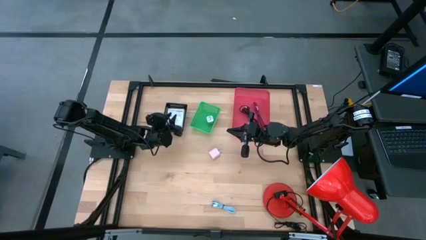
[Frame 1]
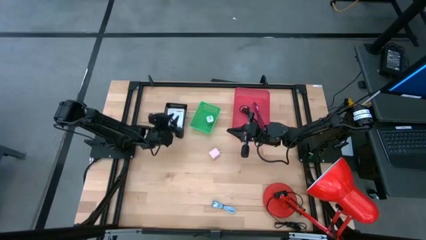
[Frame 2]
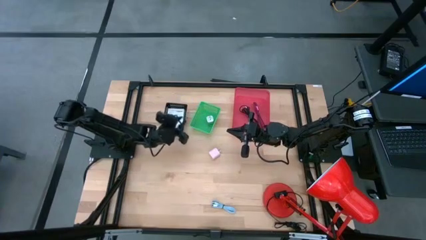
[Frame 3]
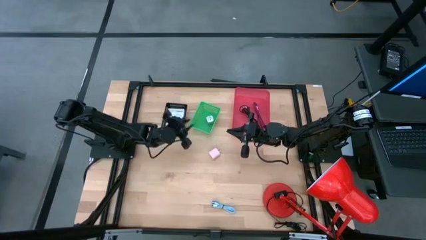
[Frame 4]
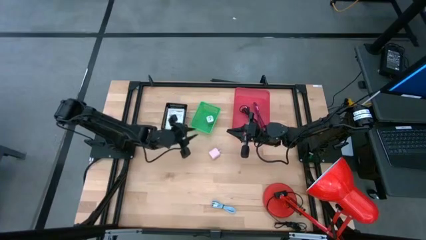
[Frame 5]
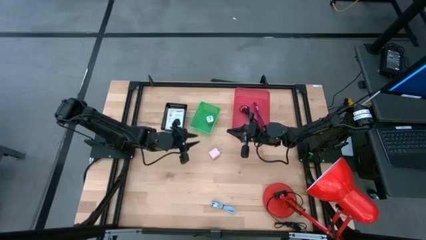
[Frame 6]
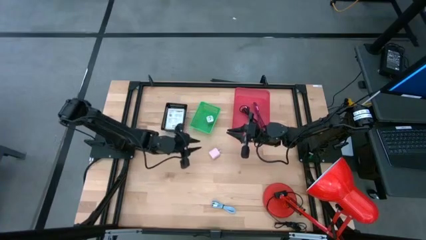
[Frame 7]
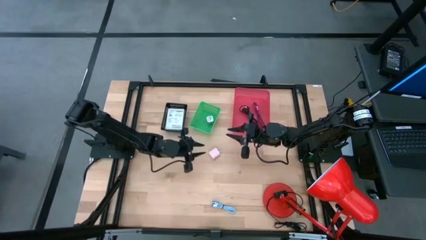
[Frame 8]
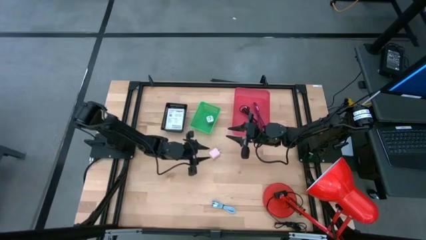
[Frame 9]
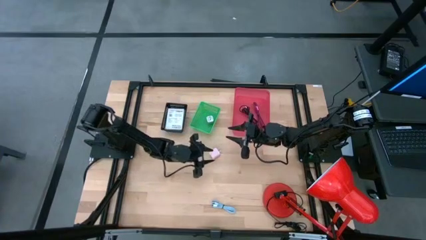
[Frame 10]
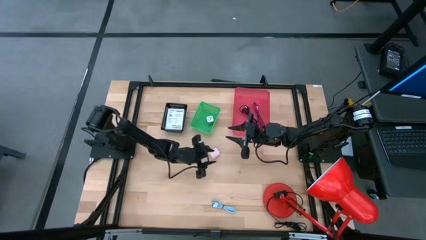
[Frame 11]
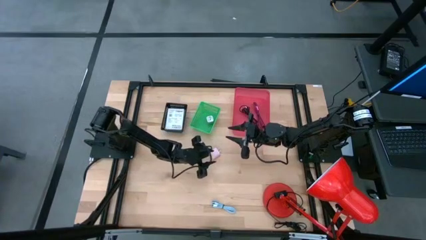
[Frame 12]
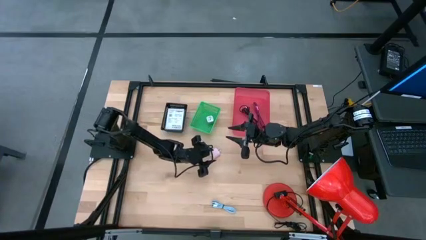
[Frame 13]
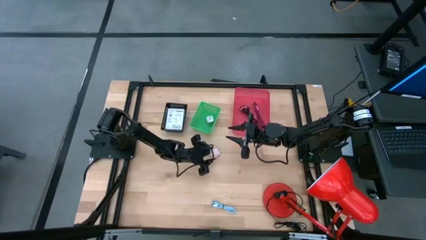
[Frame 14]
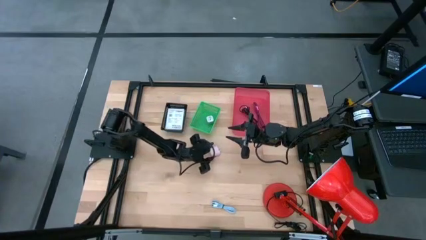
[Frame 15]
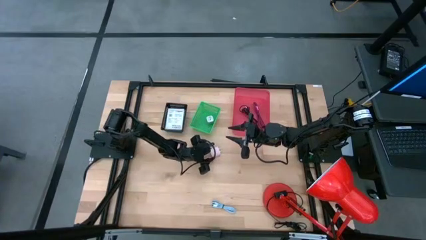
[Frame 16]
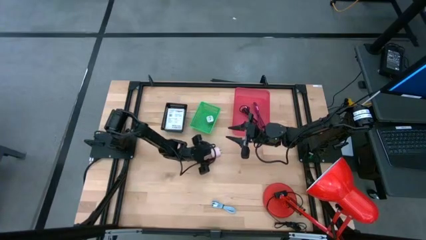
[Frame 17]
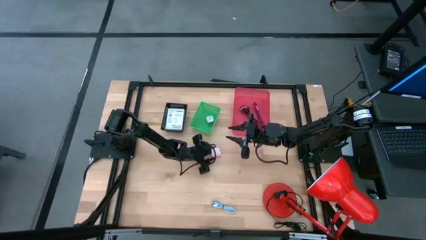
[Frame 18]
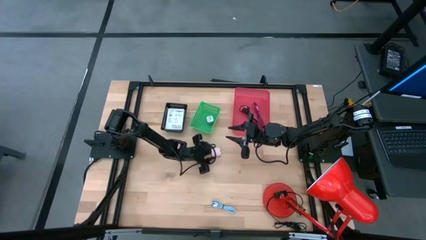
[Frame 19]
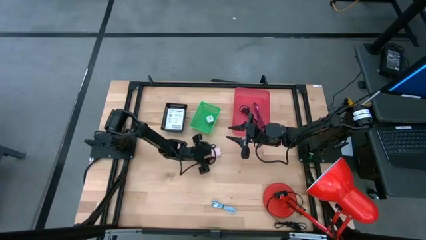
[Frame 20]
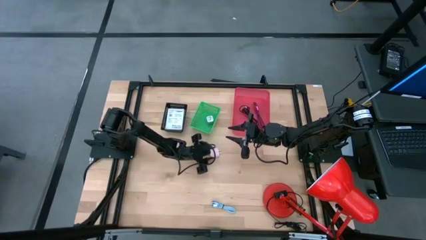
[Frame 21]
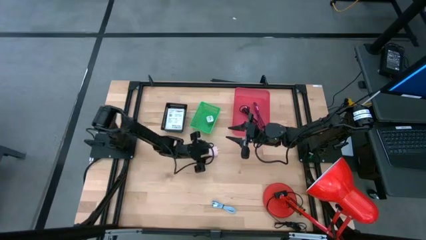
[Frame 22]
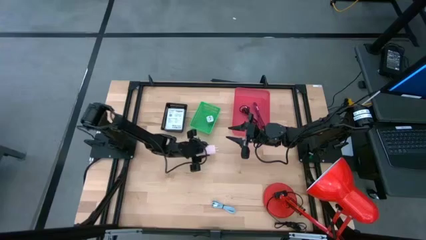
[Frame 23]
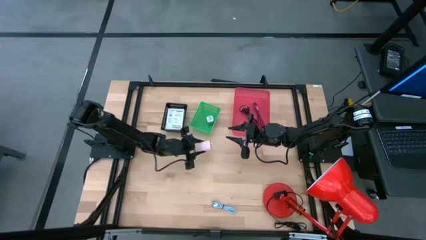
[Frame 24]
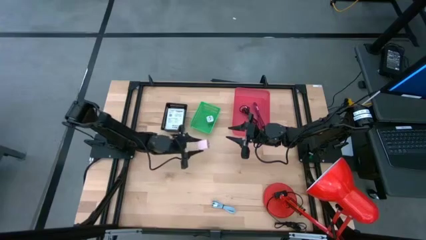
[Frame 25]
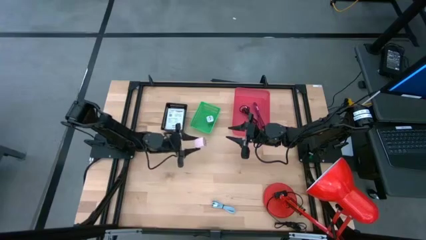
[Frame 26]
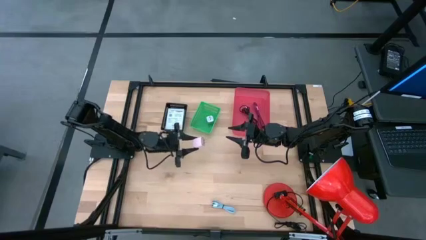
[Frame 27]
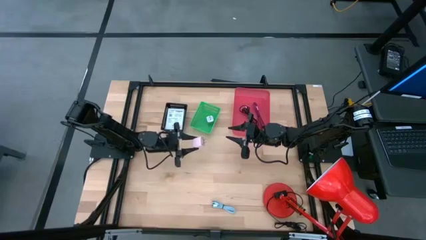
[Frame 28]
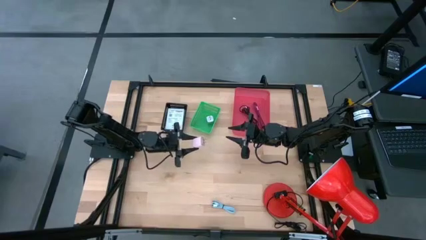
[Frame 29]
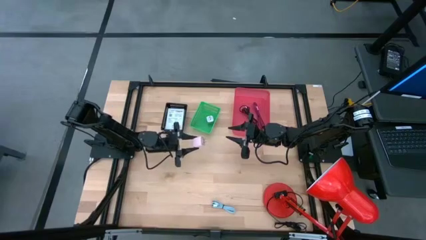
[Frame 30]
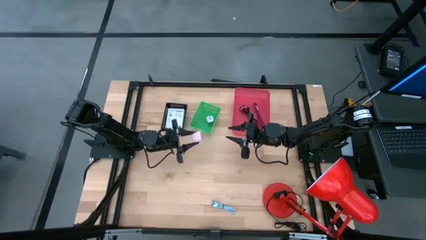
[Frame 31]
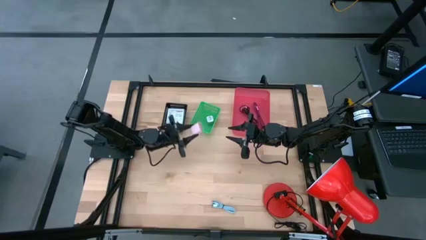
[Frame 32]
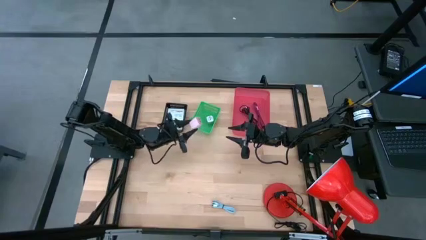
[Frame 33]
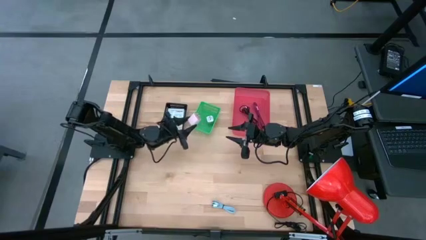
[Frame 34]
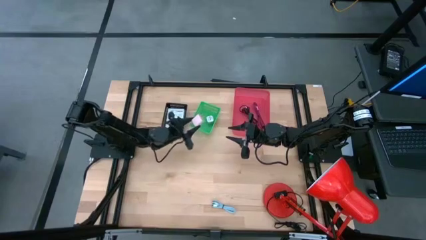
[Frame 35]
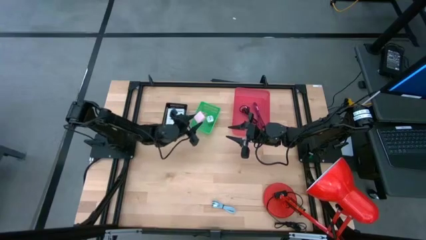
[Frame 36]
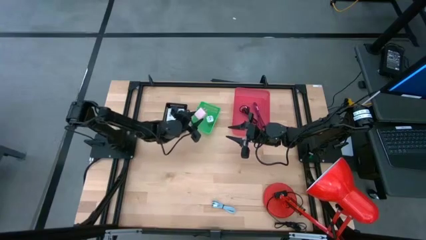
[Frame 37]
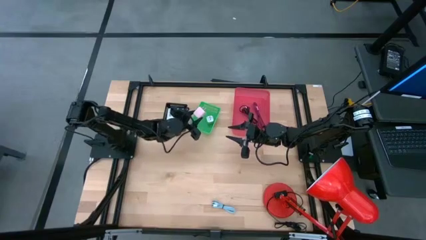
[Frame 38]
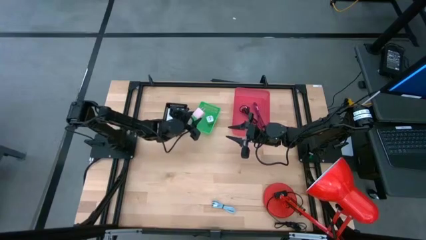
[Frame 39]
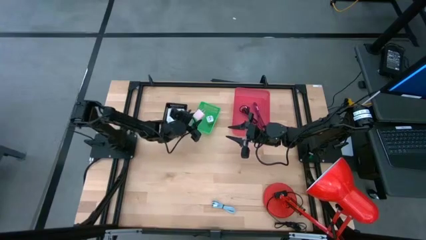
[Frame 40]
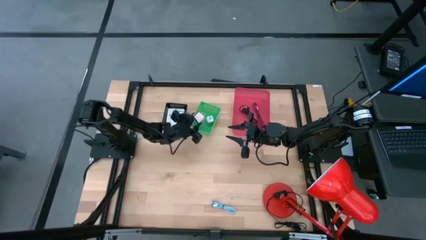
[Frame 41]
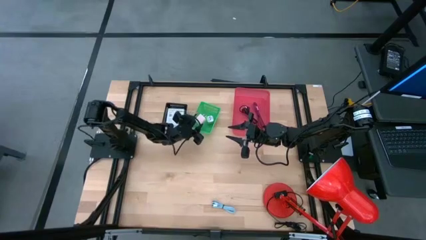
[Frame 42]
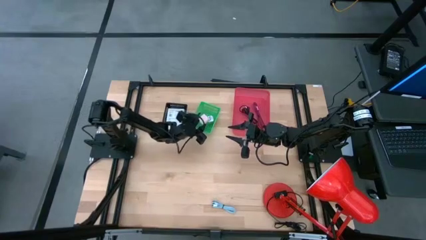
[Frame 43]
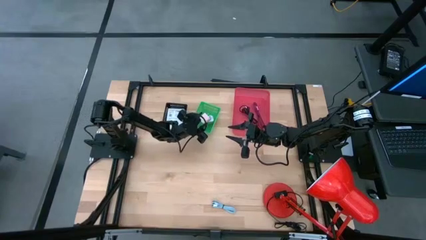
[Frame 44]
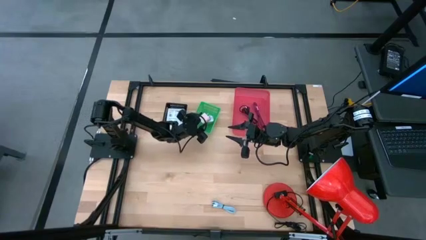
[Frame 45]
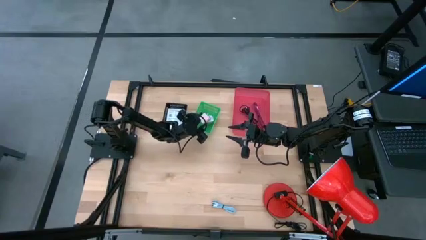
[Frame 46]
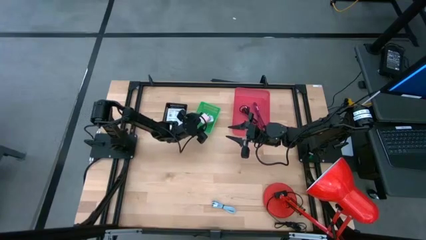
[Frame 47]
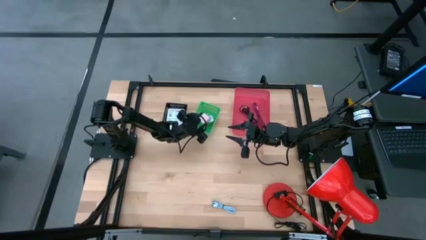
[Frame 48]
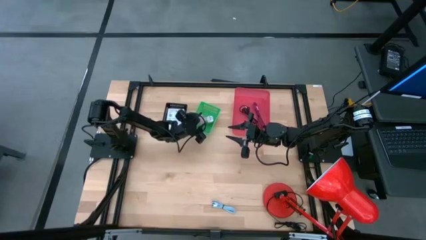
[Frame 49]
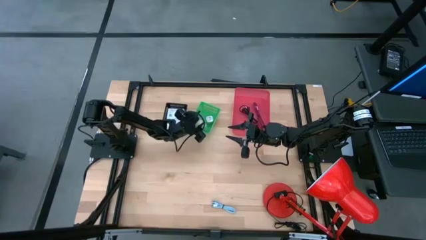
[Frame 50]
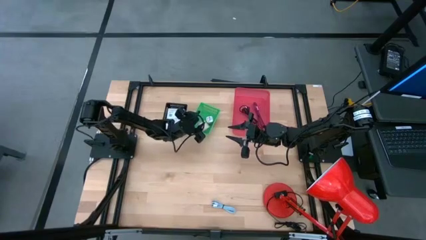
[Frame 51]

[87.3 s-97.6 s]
Task: Pick and place items into bin
Put the white charger adapter into the green bin
